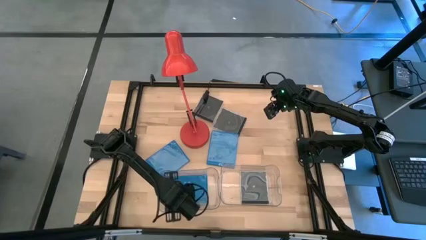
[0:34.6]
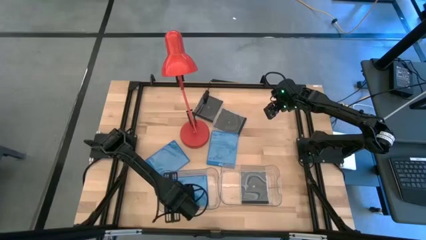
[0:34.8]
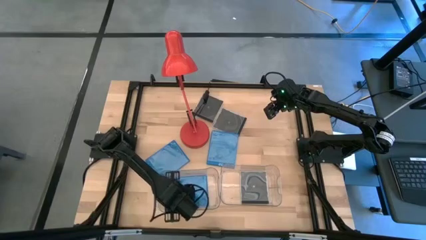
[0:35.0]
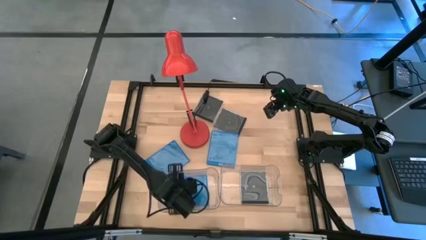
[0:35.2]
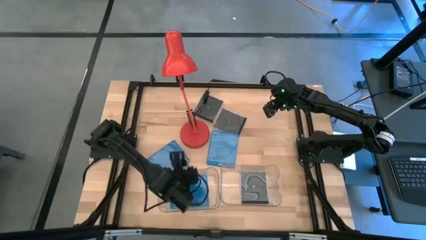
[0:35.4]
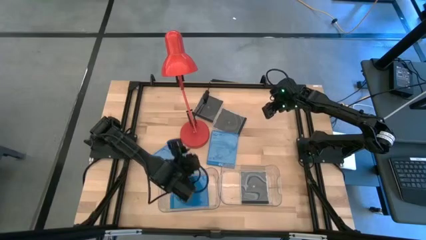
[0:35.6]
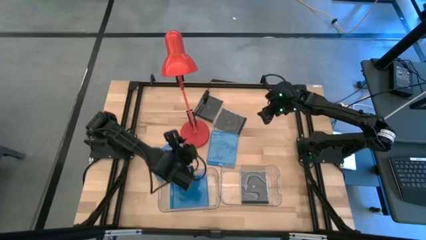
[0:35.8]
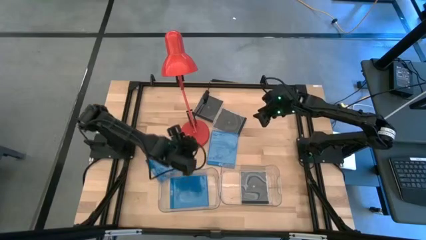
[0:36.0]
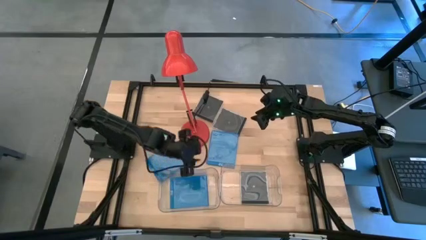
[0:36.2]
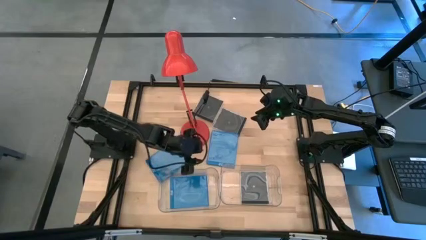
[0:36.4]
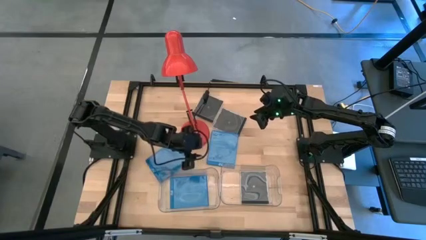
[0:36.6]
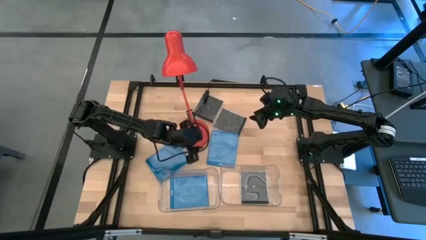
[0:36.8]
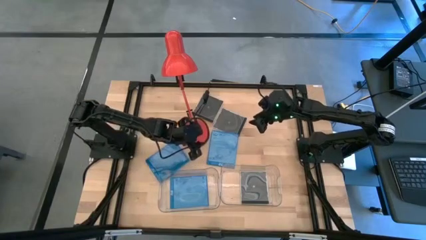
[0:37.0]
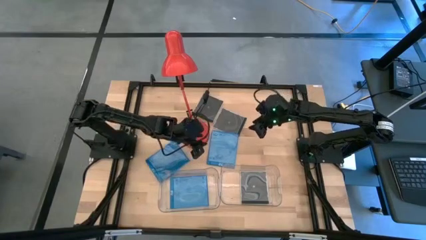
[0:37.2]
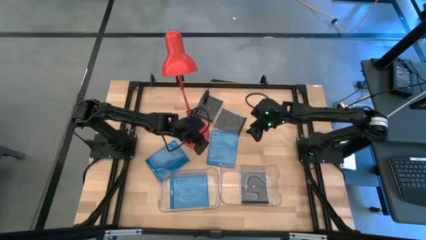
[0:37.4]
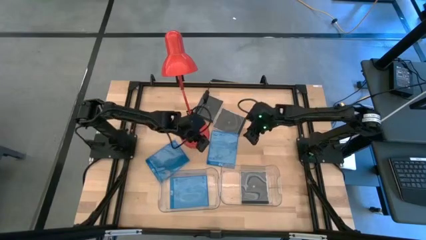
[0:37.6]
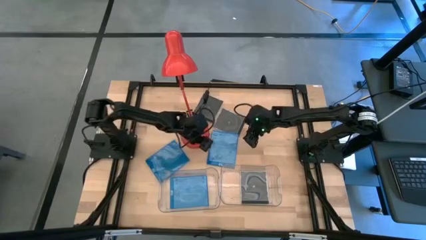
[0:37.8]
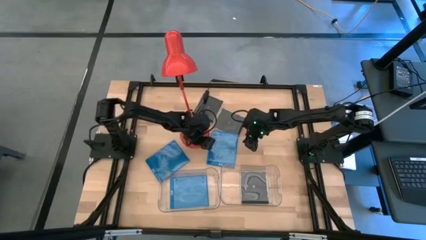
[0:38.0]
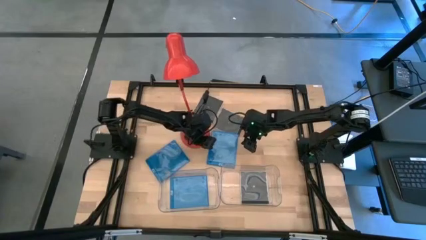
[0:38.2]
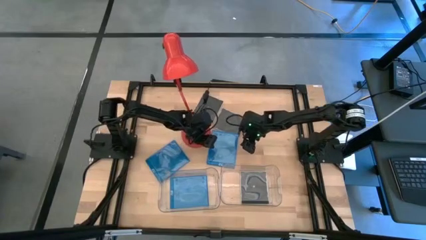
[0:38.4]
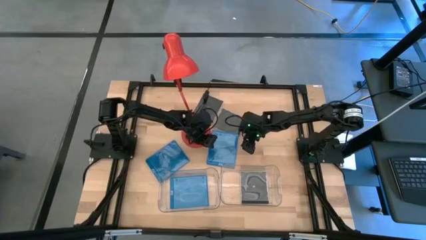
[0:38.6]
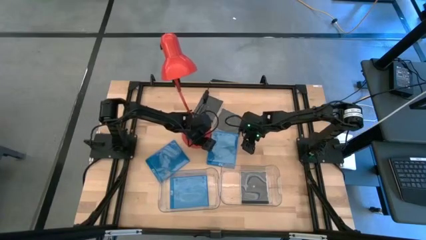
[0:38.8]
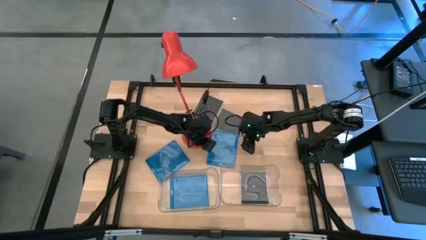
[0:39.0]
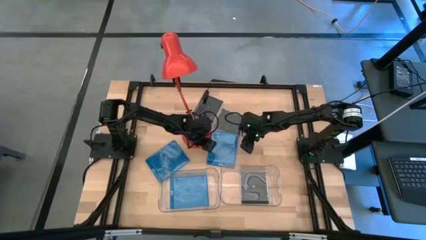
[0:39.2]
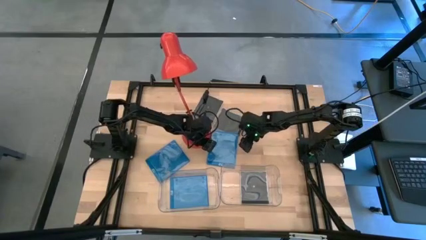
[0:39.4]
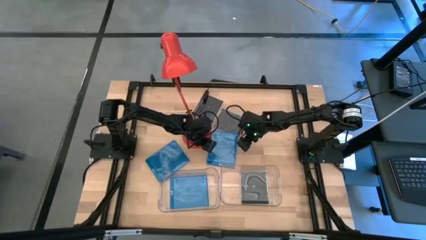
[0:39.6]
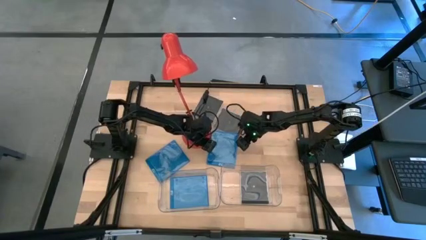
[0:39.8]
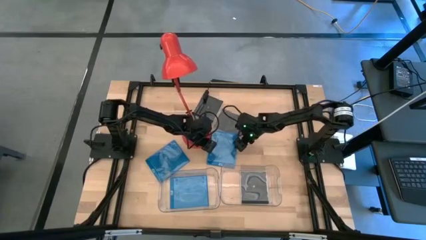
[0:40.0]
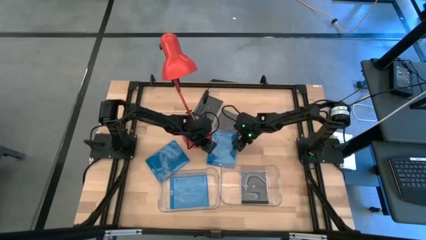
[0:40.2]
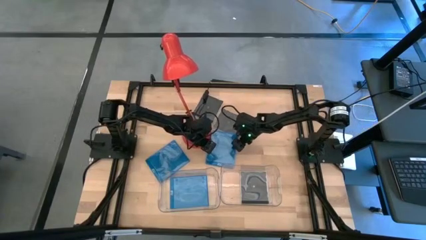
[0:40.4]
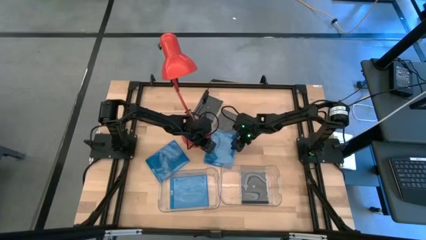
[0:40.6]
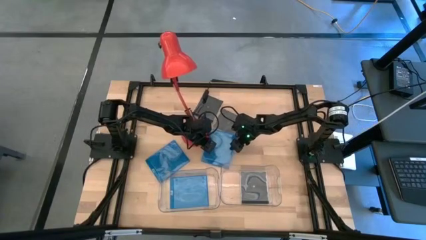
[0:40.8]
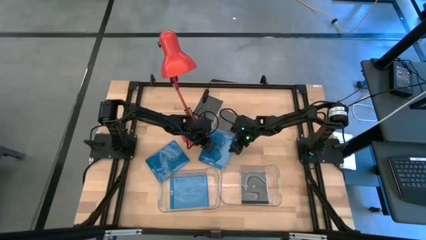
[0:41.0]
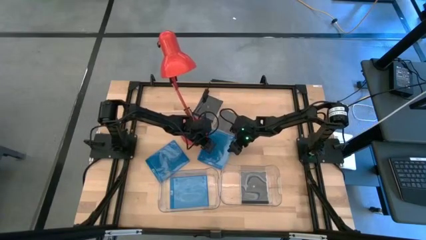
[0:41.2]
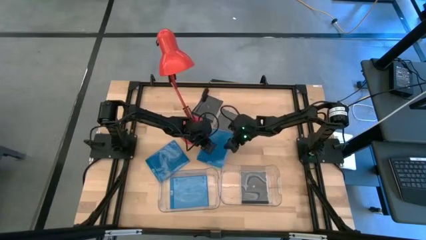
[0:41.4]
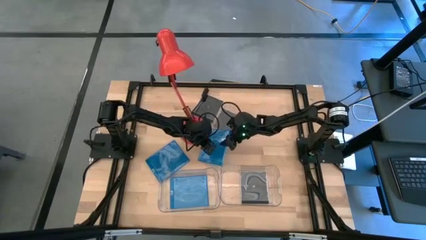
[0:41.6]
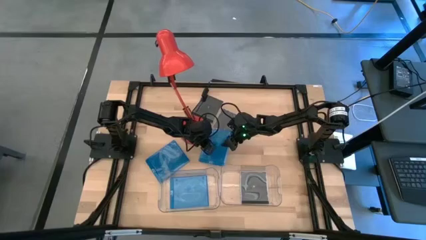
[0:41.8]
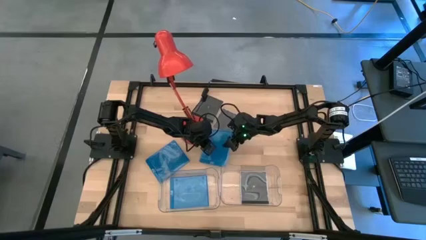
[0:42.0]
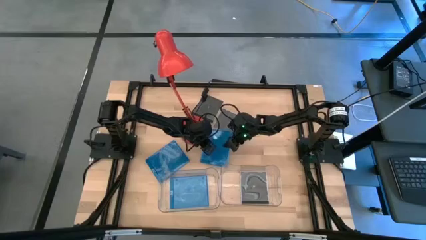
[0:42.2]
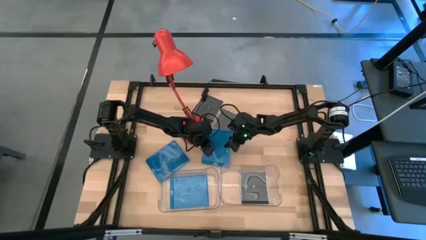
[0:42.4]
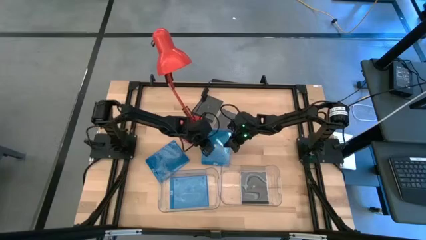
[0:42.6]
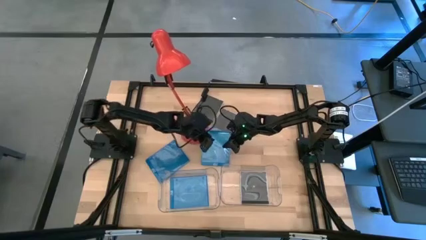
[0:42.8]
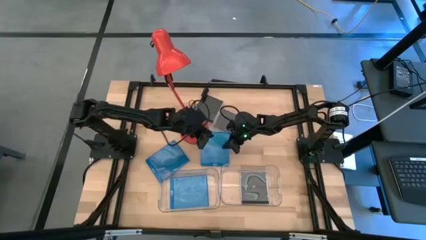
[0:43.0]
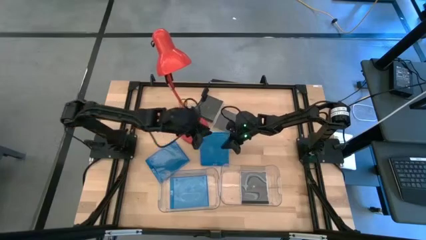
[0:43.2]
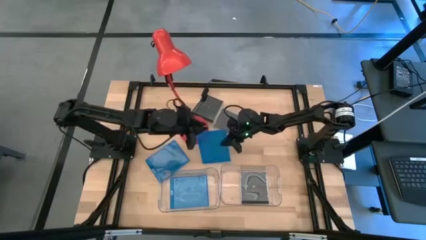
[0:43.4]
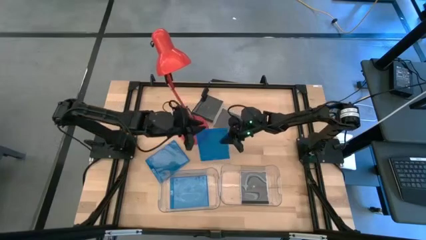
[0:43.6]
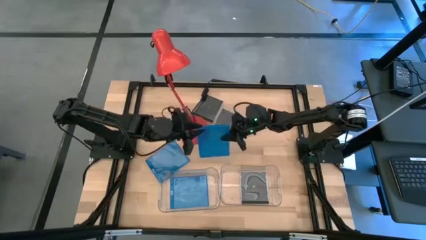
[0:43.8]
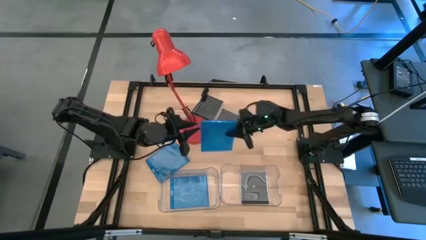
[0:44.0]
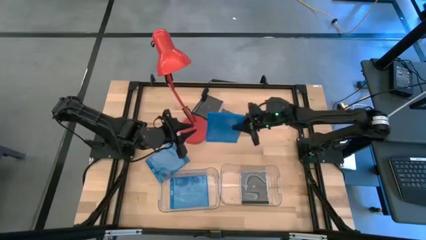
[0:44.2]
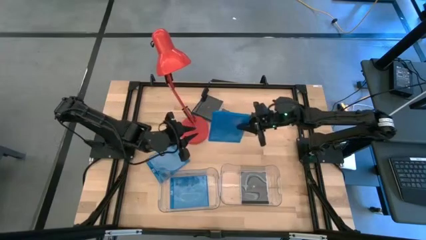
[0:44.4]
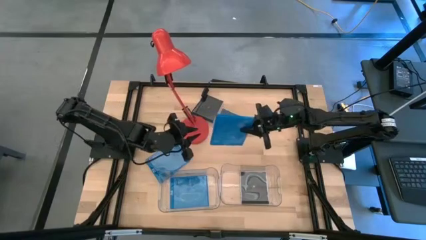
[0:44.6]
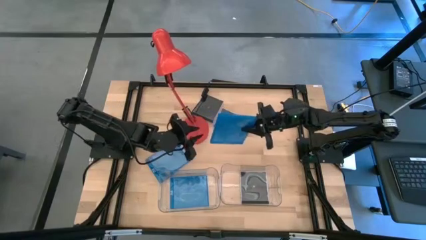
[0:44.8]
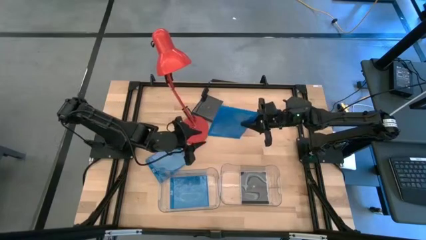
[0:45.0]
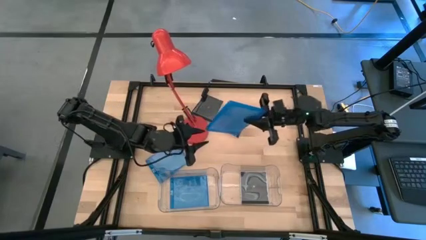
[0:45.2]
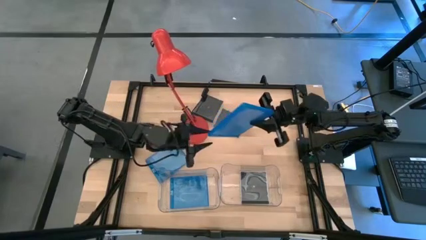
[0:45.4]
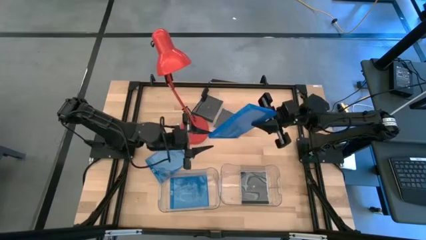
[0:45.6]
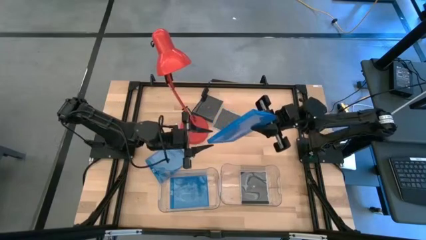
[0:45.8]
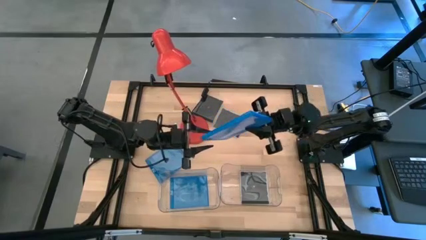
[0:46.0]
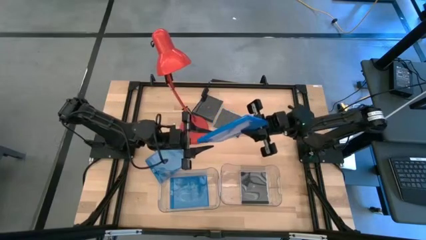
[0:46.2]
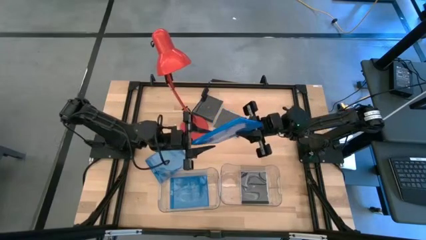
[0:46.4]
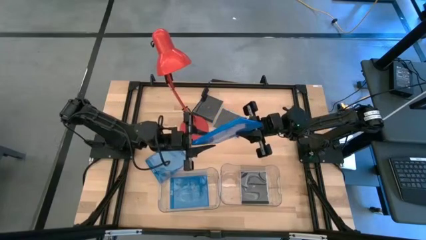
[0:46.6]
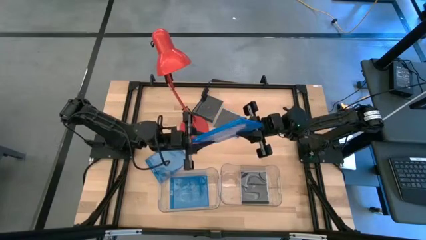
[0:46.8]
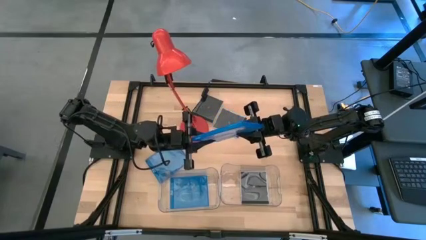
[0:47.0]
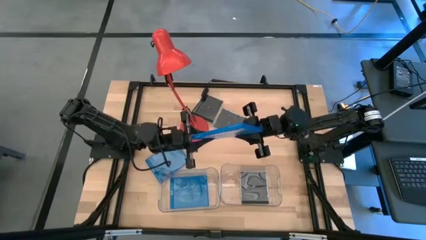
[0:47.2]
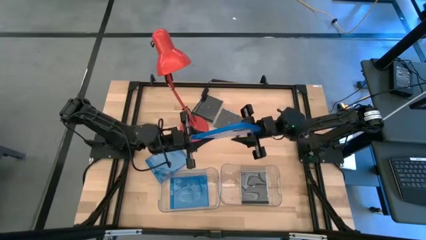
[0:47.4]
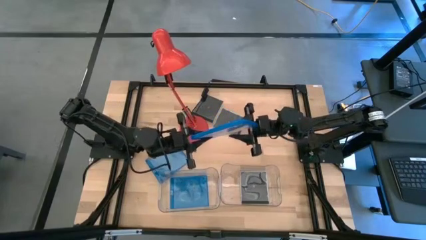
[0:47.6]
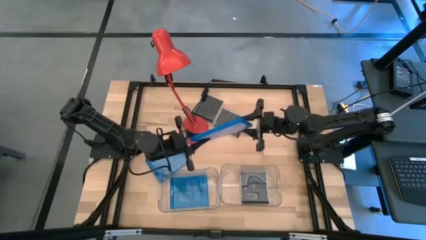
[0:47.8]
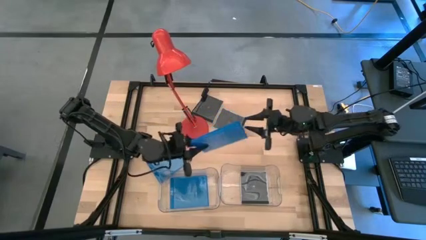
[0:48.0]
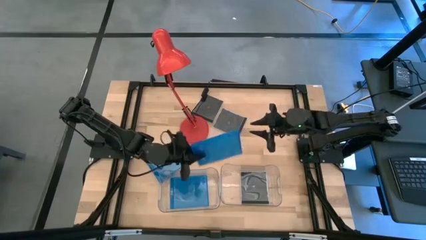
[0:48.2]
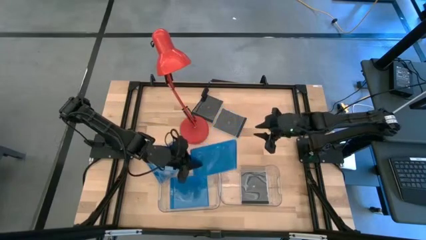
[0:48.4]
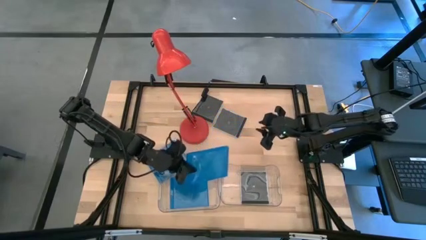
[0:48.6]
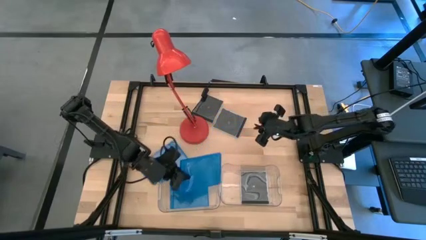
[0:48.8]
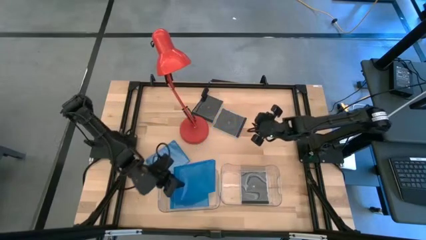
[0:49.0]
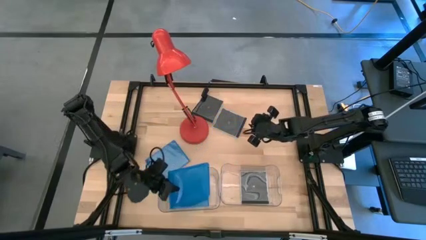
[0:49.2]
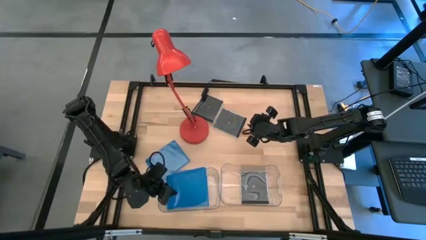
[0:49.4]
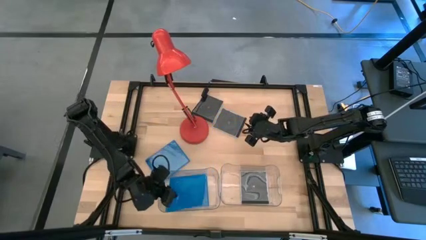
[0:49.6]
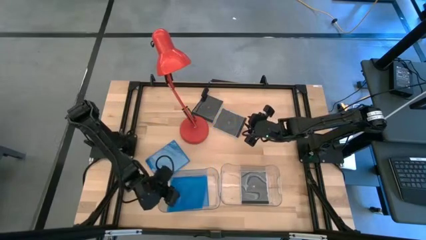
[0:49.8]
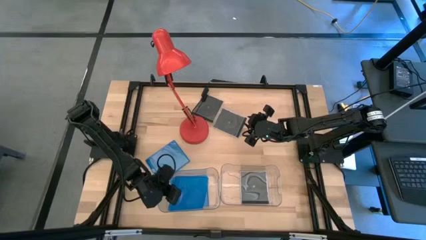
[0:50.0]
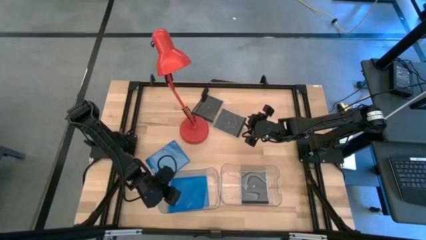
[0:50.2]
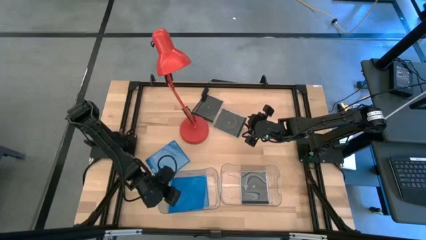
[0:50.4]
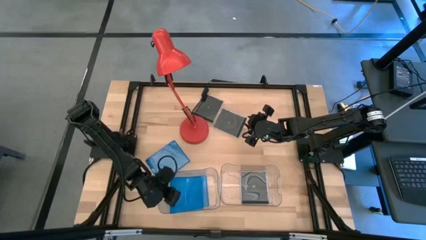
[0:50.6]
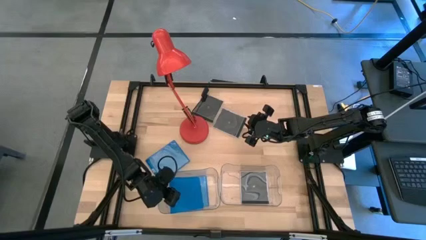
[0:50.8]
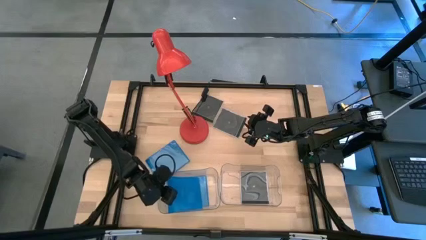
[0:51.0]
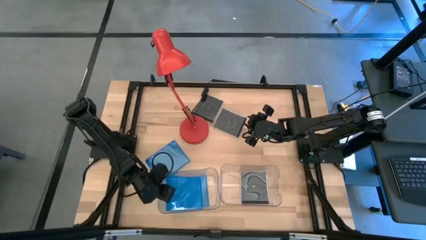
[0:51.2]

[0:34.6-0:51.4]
Task: Pick & place jewel cases by type
Put the right blue cd case into the left transparent bin
